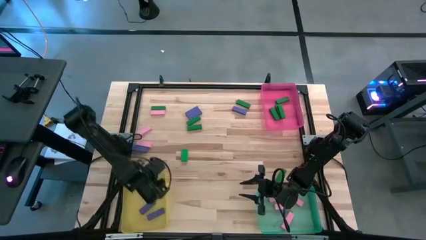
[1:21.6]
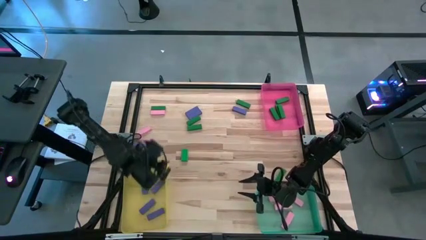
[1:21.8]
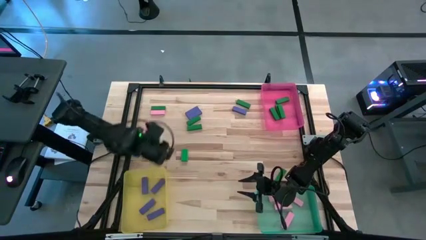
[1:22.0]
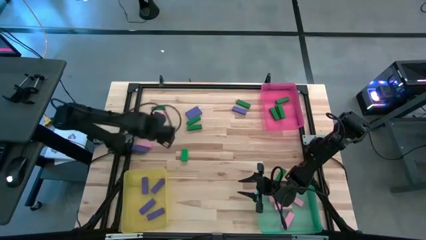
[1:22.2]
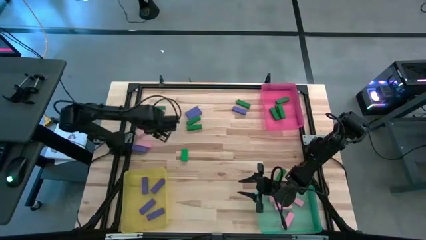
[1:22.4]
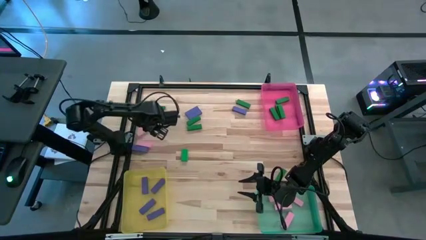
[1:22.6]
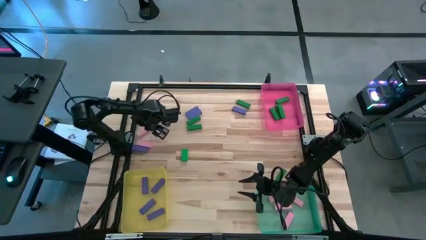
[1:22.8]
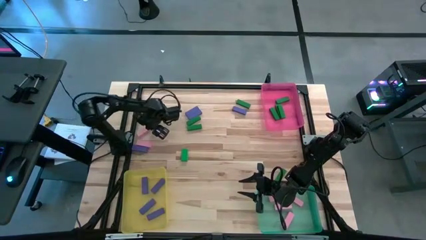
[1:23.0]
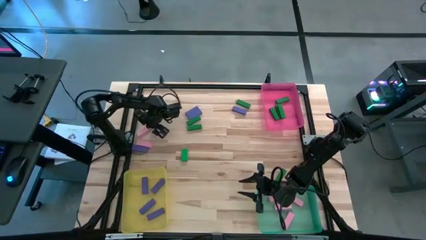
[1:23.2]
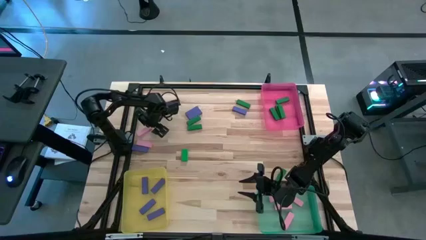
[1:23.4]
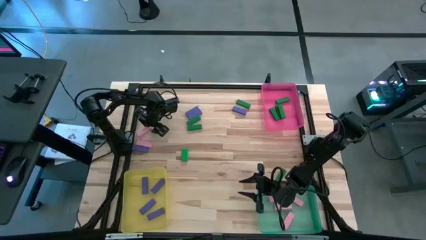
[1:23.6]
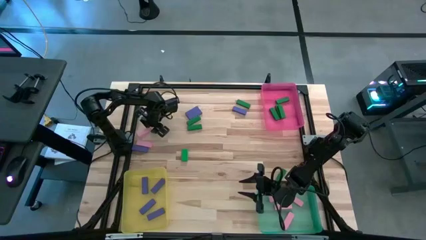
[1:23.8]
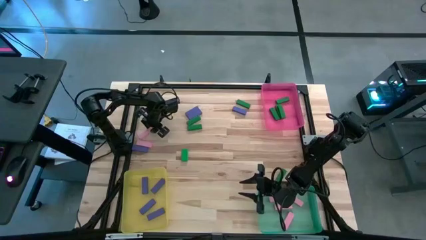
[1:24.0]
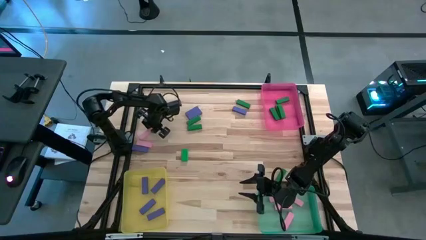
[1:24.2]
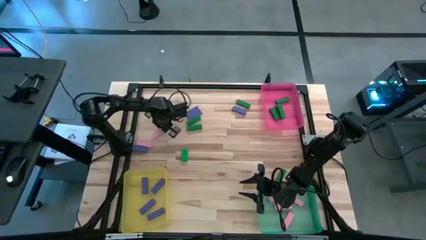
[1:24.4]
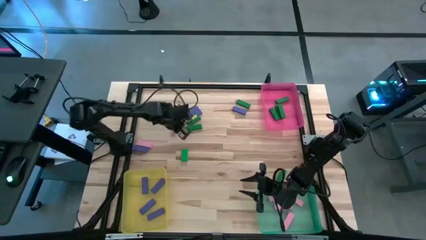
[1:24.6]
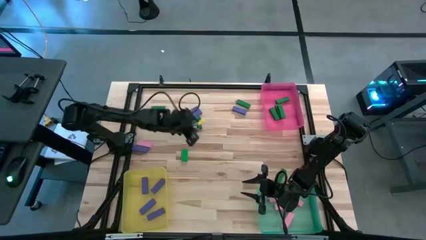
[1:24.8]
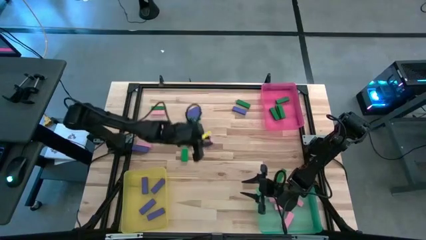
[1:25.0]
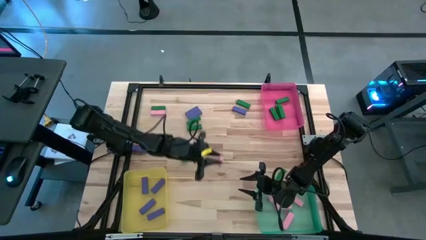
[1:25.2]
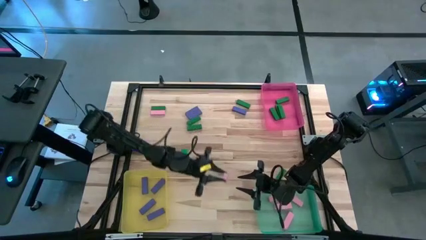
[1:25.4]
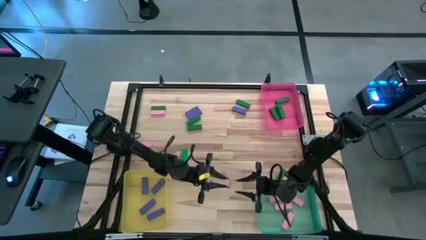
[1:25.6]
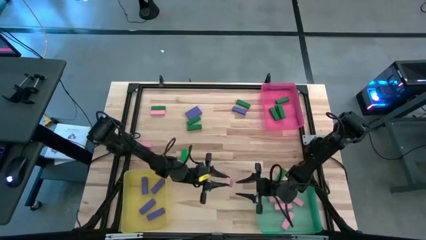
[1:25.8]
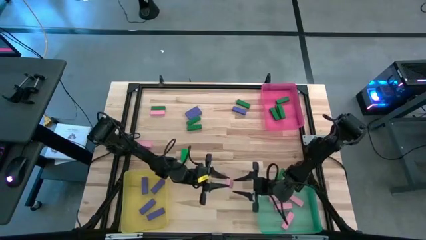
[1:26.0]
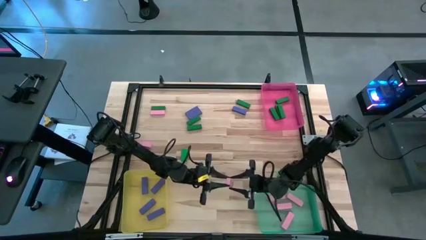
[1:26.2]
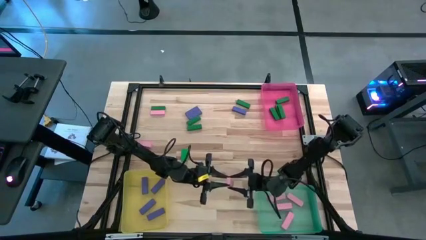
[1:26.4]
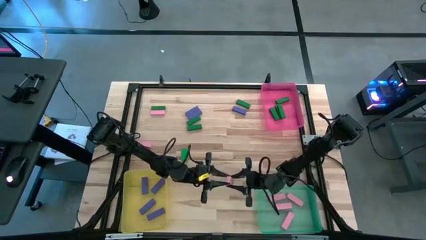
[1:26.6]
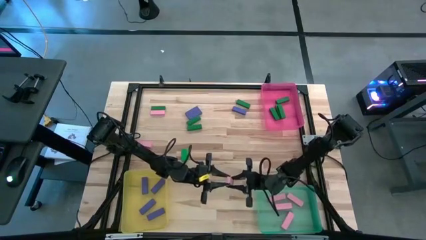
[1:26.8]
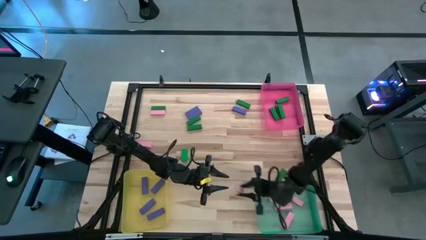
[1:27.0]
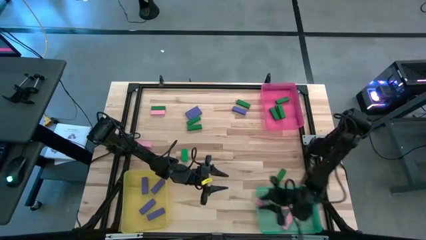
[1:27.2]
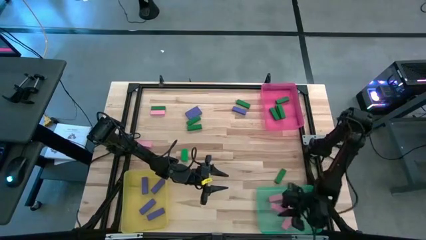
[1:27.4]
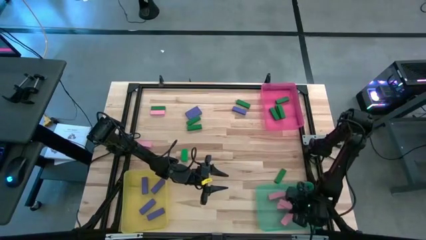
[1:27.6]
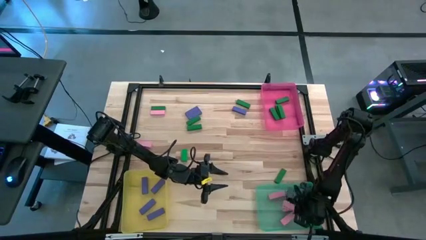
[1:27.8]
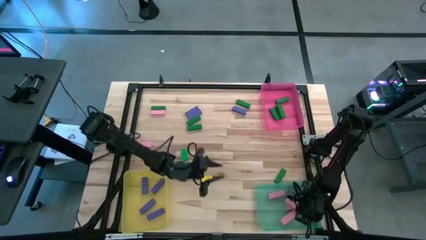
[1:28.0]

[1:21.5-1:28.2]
Task: Sort blocks
Put the pink block into the green bin

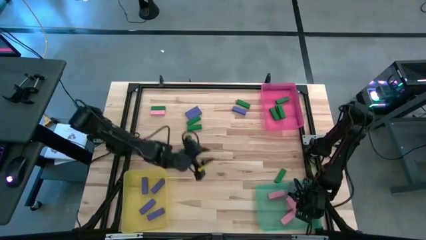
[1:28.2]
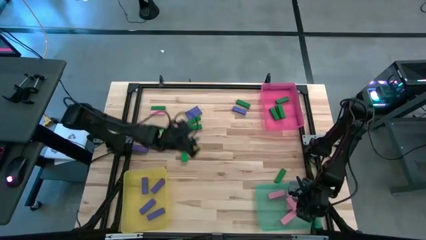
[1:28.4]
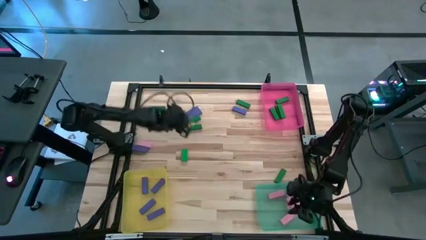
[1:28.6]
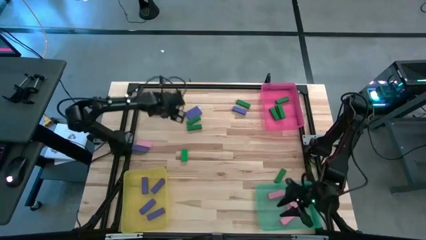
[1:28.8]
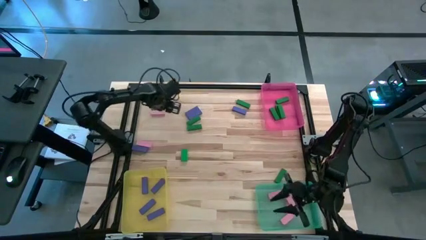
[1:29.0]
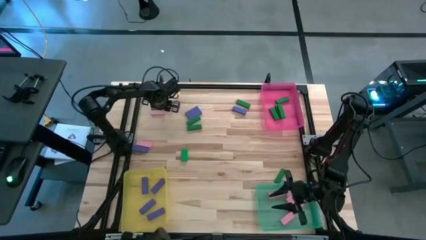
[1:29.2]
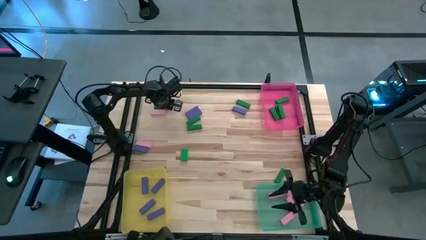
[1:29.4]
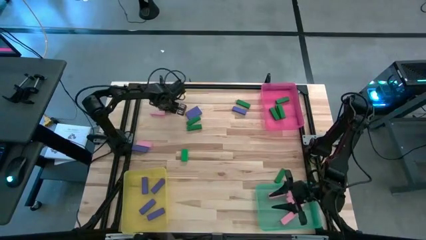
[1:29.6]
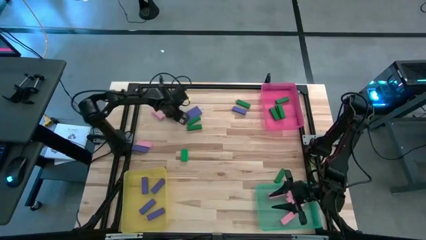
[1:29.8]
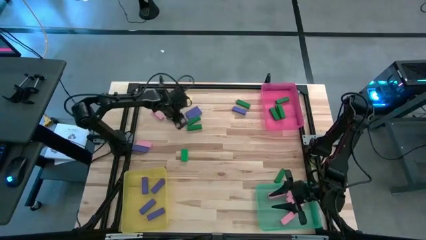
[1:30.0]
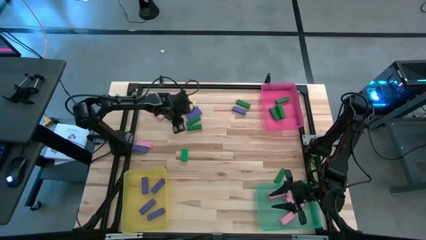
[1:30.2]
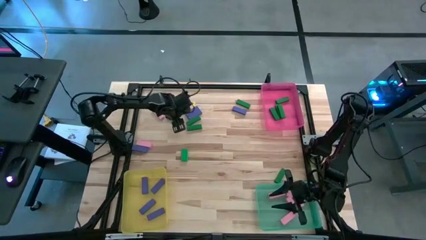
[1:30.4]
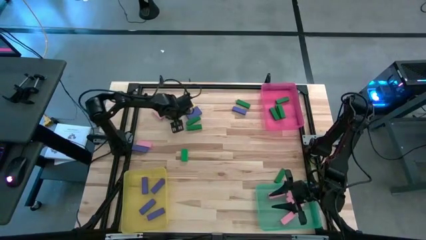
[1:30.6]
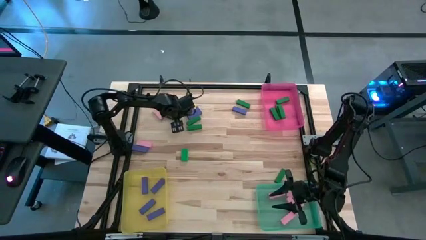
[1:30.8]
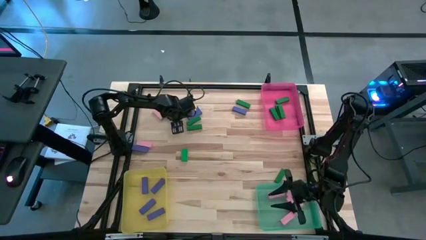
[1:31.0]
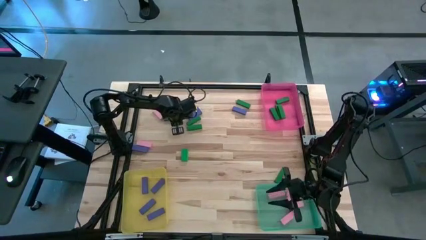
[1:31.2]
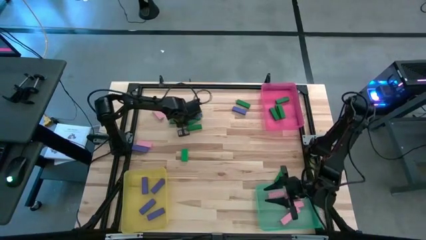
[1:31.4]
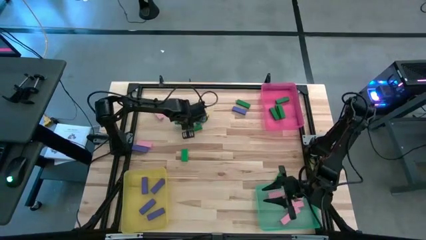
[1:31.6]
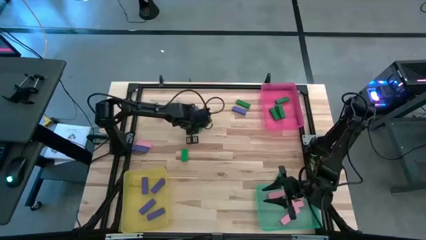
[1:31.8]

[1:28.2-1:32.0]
Put the green into the pink bin

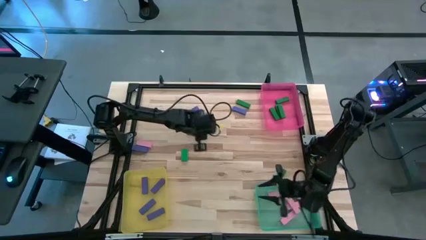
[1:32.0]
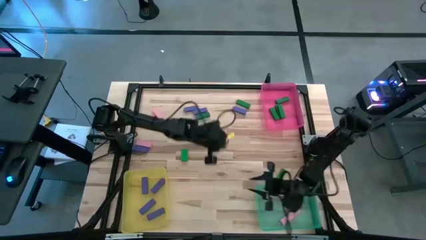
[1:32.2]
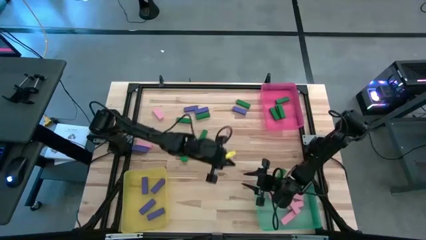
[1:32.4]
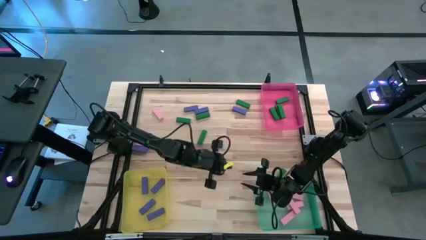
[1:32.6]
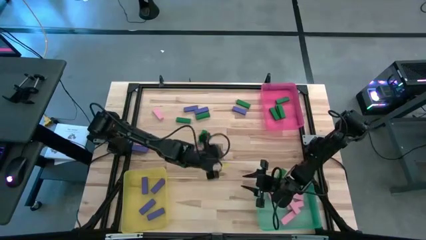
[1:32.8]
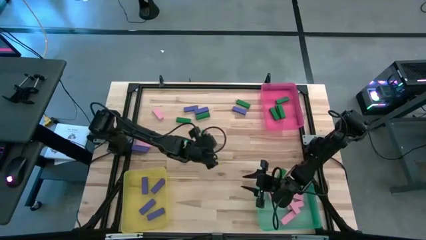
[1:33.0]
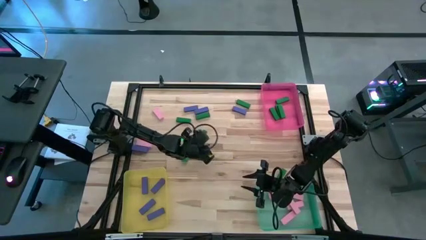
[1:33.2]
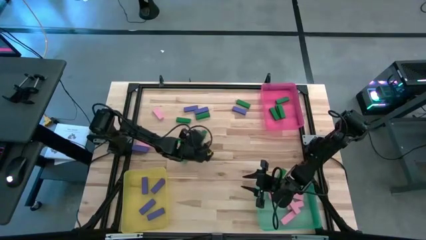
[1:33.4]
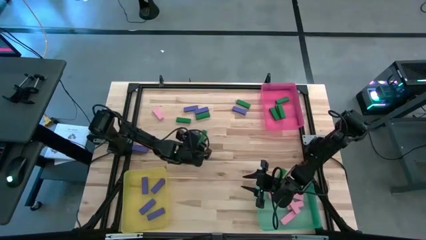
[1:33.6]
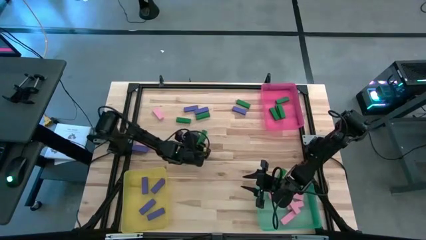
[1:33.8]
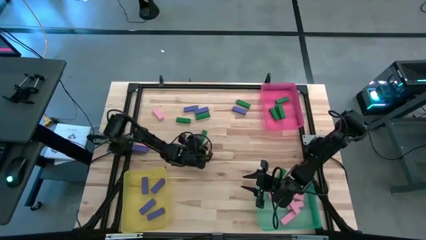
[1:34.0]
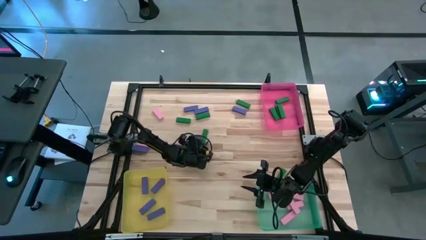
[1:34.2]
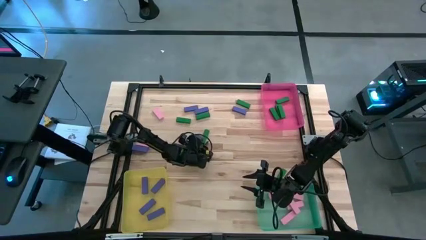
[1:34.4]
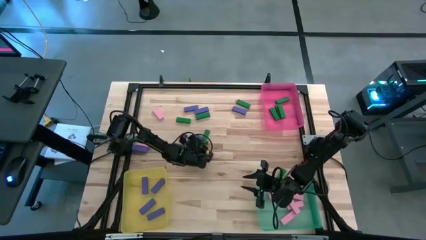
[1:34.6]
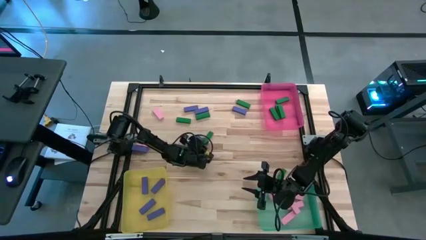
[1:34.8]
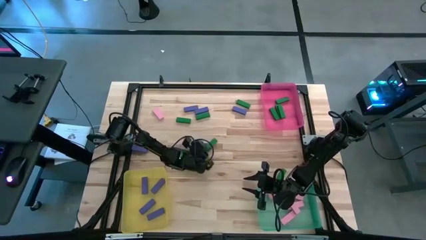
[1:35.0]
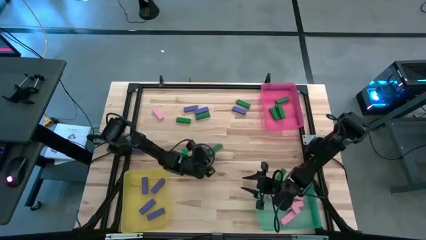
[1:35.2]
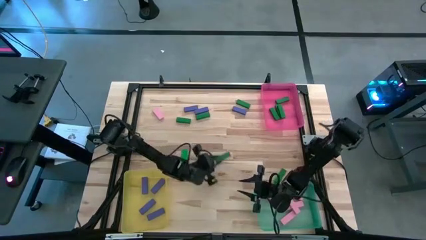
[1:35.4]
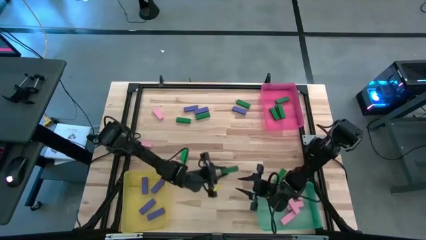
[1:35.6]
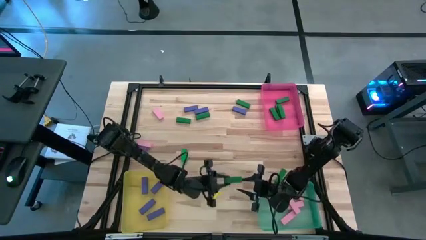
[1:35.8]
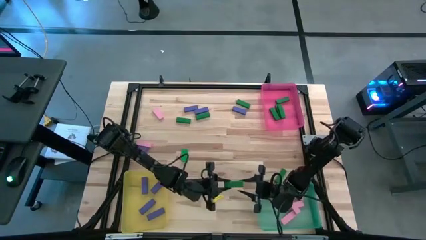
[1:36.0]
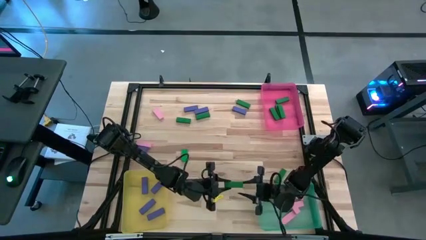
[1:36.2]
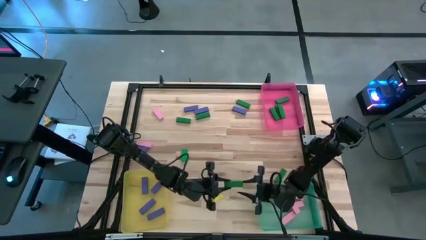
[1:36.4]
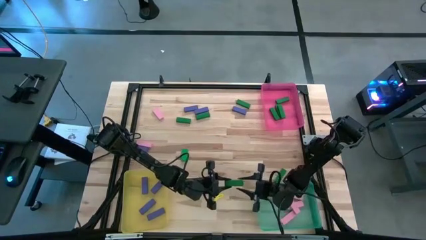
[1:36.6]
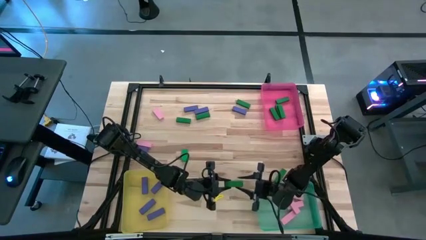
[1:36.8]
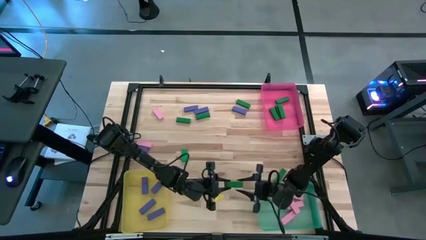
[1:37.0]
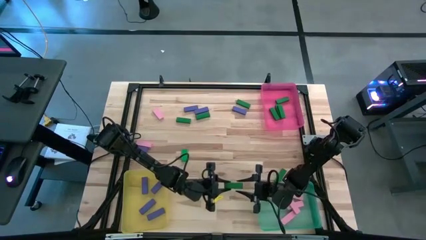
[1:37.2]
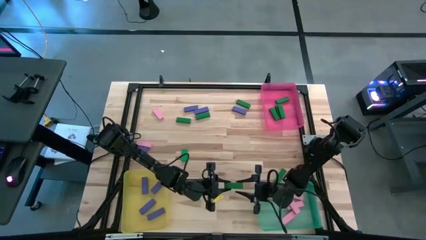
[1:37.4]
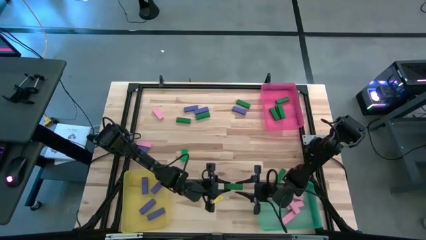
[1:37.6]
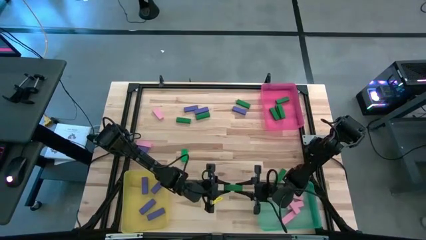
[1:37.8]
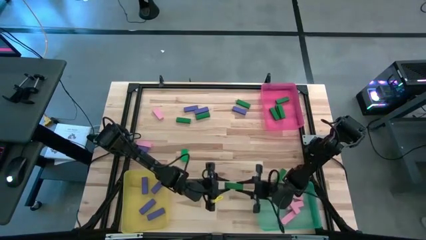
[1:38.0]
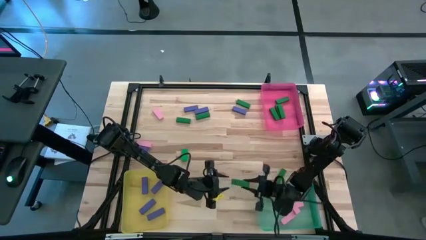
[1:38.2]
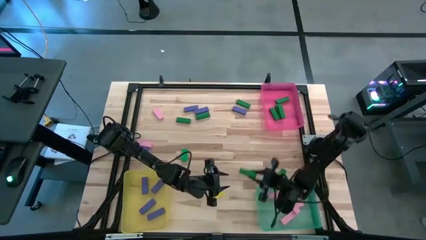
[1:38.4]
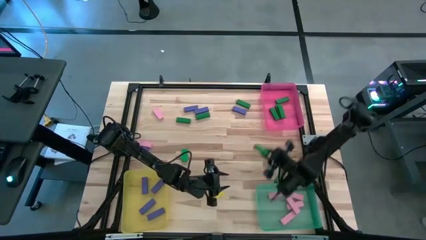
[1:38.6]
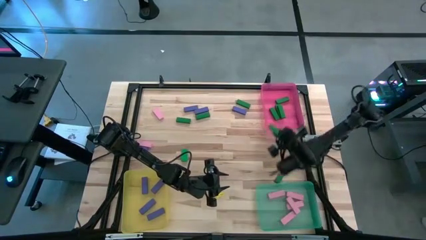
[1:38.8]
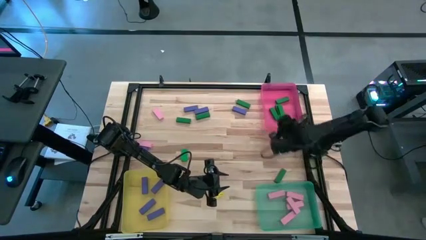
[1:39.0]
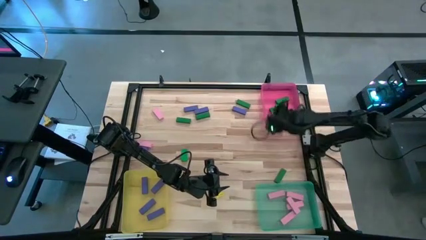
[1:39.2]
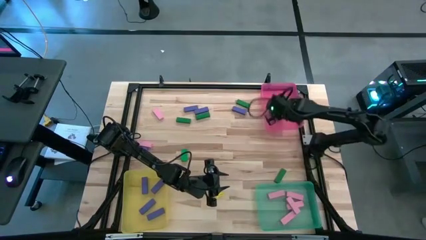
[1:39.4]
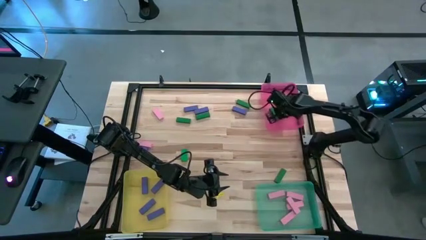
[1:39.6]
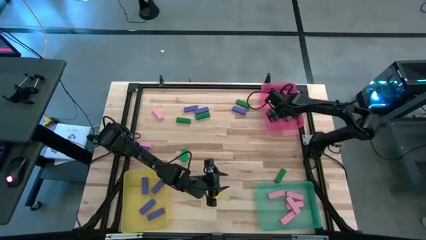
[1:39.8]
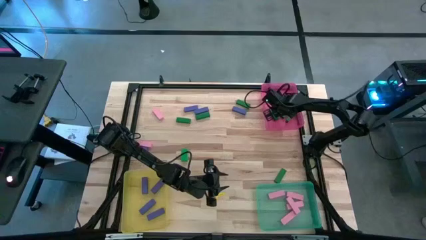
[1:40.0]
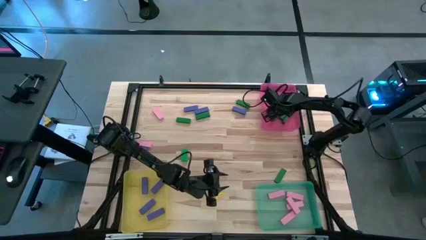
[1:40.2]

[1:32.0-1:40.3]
Put the green into the pink bin
